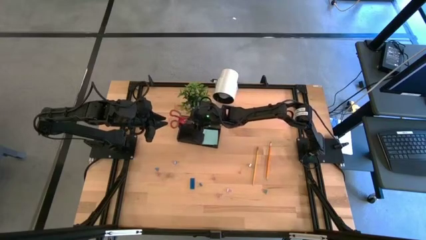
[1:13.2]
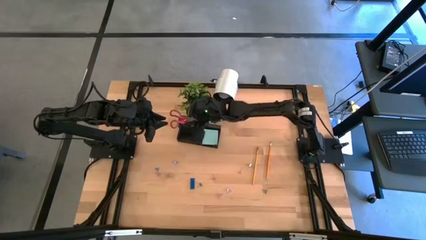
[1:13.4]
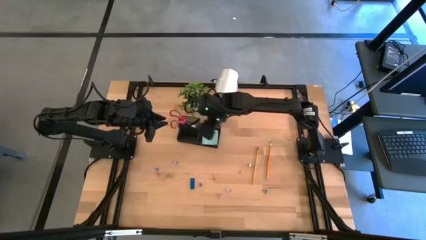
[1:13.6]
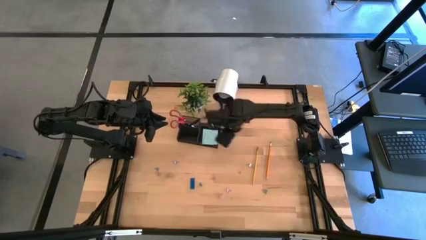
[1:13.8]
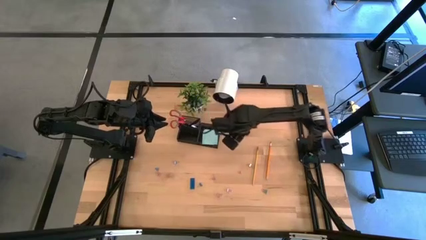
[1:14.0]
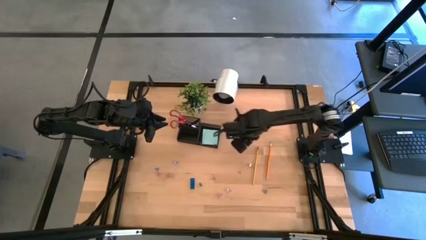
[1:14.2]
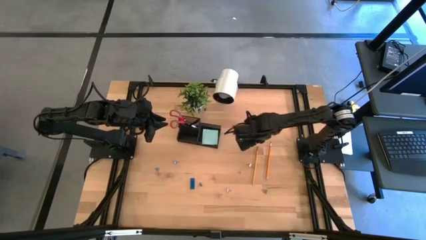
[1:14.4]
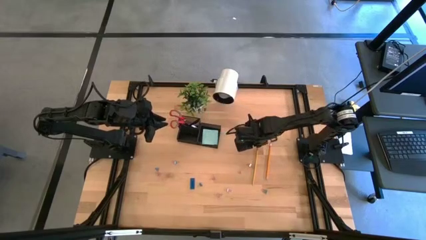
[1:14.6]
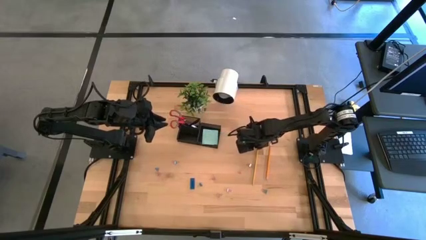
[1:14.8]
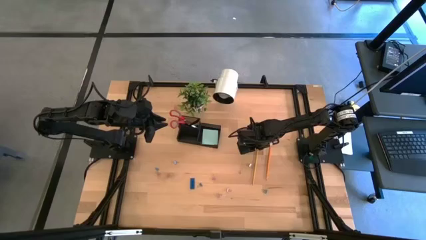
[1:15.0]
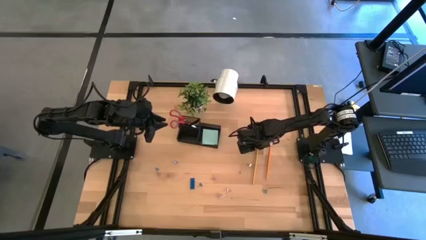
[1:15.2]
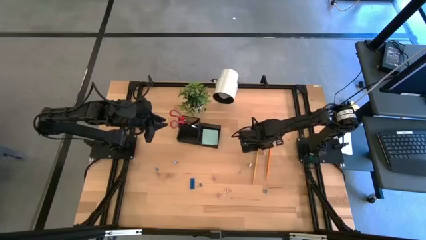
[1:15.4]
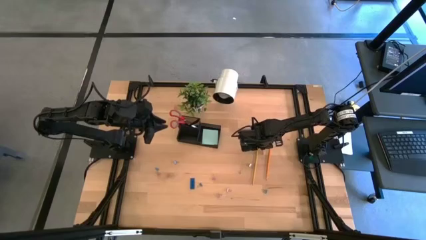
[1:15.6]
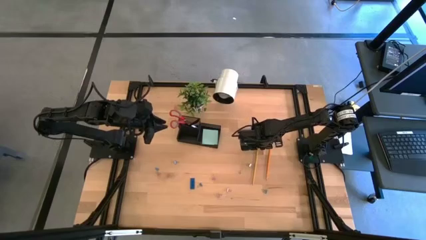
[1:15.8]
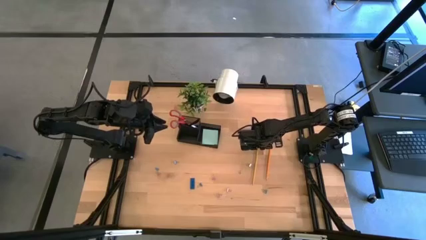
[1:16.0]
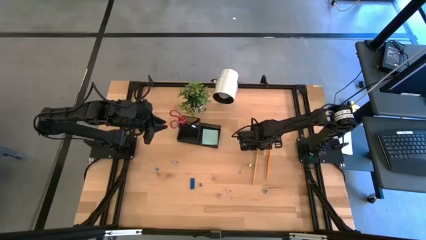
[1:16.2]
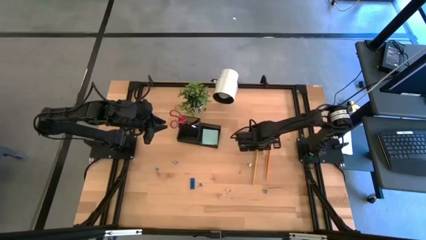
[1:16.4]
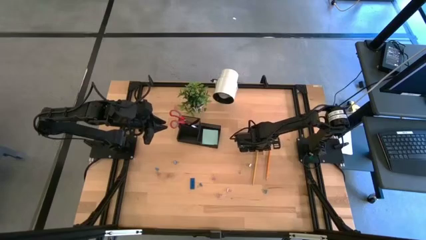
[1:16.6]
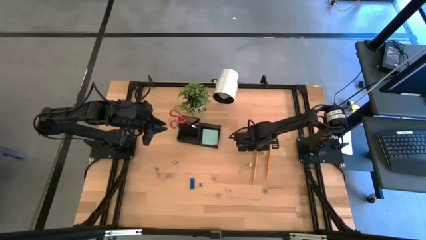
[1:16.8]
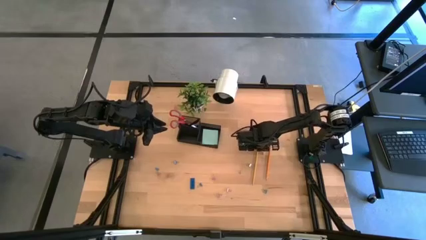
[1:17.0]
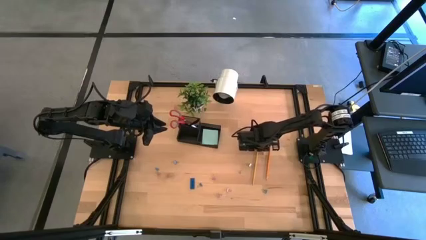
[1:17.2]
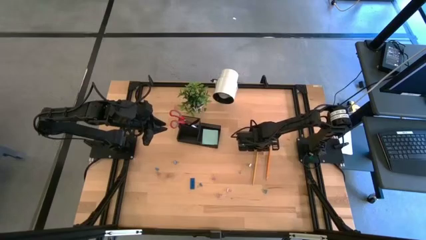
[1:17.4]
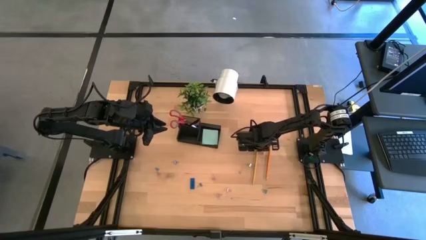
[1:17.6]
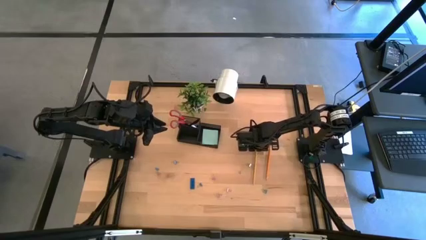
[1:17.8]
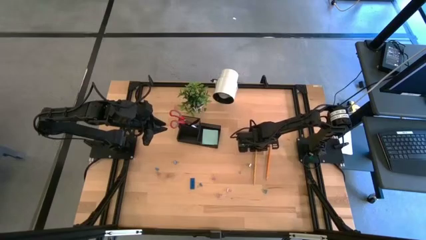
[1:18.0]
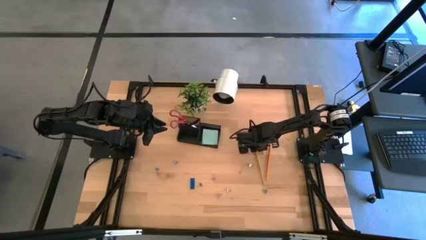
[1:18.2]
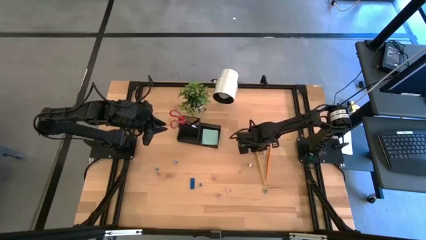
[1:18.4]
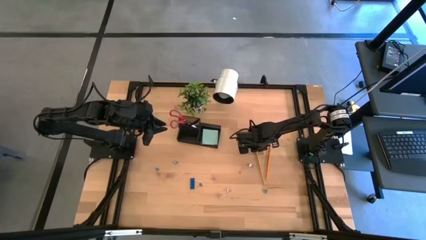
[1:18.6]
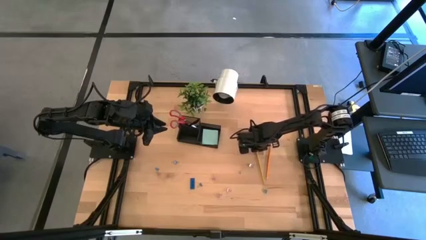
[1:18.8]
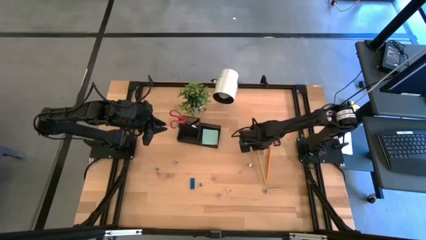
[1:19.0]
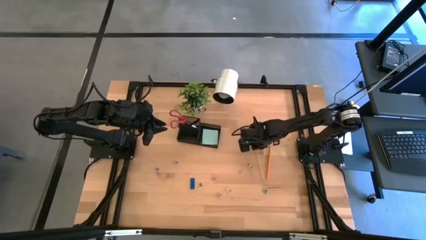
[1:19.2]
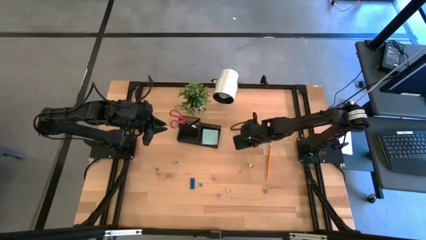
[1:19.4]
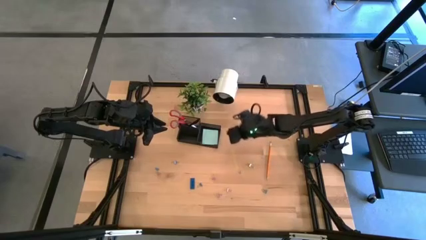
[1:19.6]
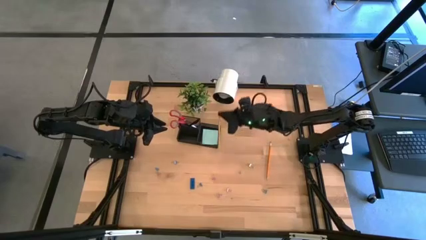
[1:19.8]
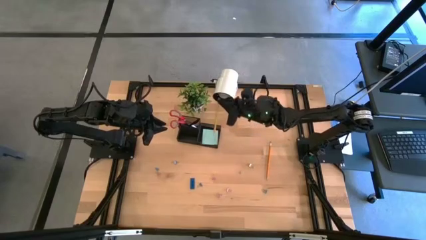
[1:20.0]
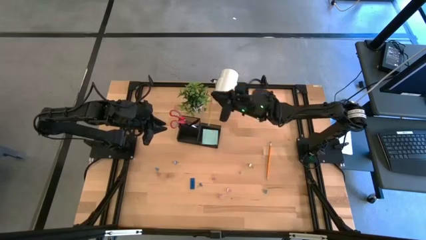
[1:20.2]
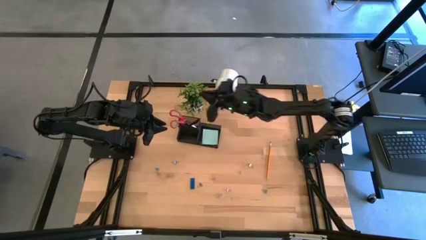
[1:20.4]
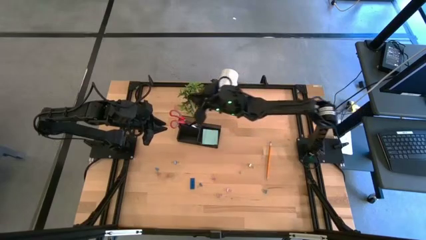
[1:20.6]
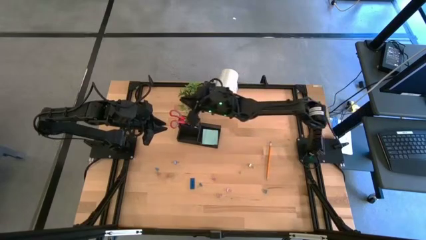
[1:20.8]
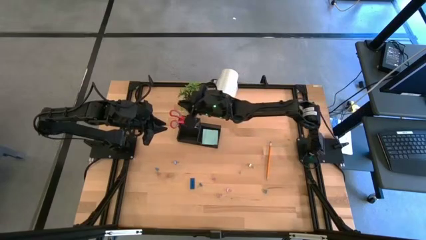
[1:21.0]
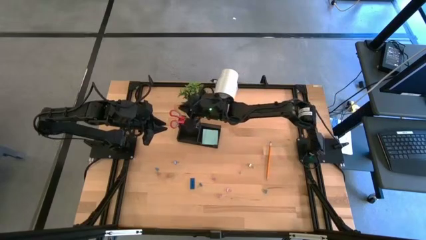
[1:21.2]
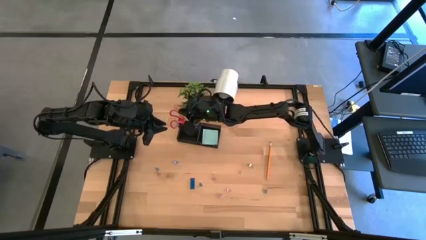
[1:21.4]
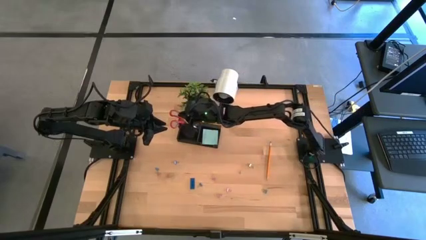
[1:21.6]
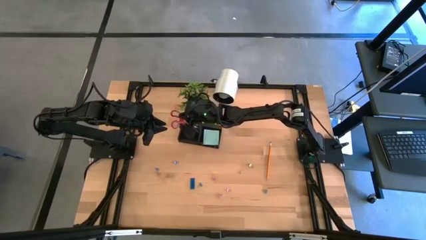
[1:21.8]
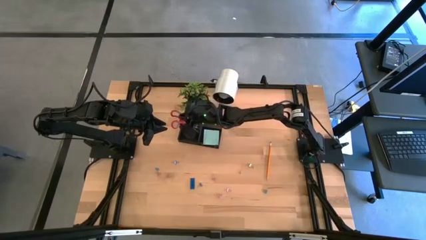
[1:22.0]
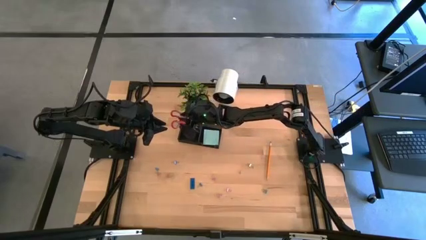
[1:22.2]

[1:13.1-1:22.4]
Task: Pick and place office supplies into organizer
Put the yellow pencil into the black desk organizer

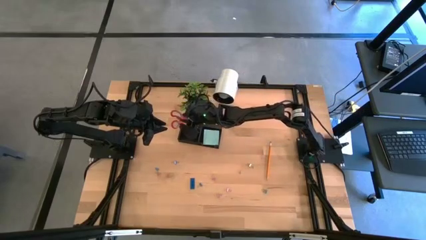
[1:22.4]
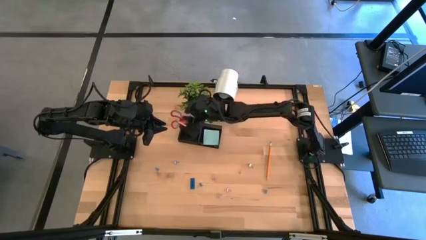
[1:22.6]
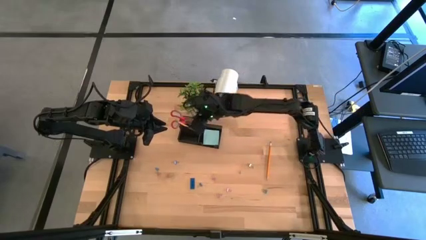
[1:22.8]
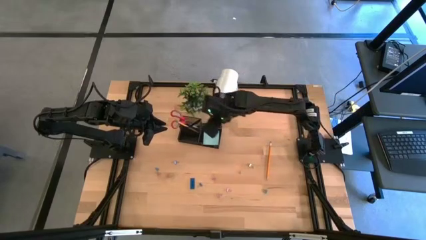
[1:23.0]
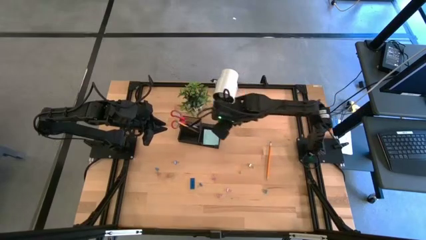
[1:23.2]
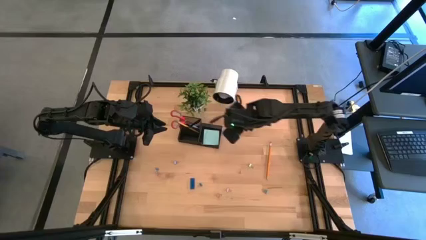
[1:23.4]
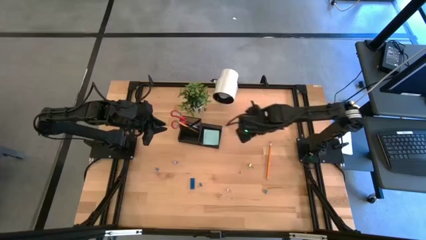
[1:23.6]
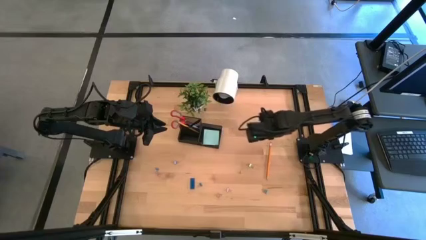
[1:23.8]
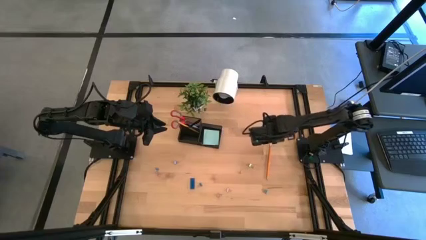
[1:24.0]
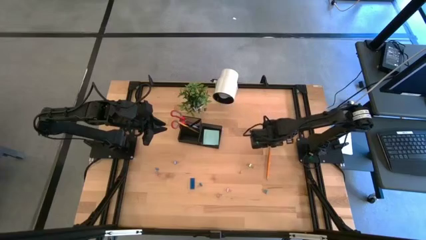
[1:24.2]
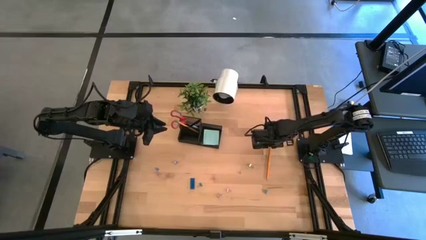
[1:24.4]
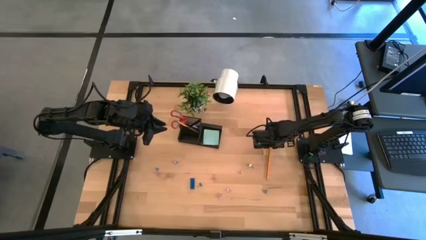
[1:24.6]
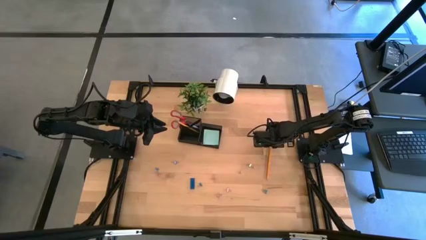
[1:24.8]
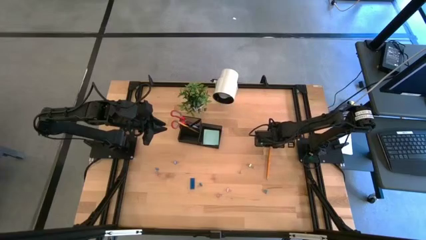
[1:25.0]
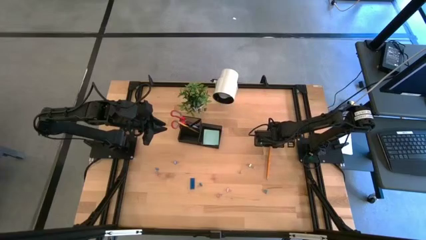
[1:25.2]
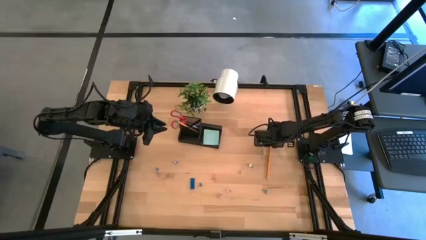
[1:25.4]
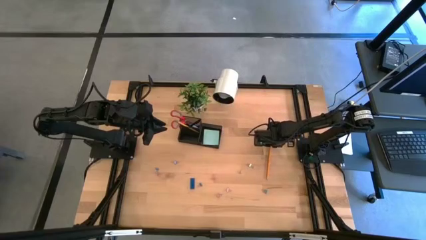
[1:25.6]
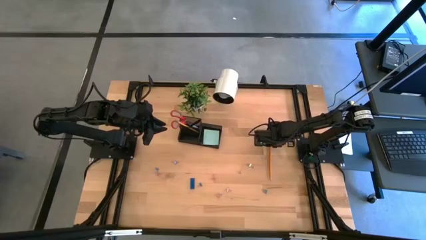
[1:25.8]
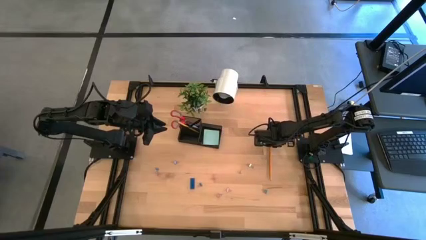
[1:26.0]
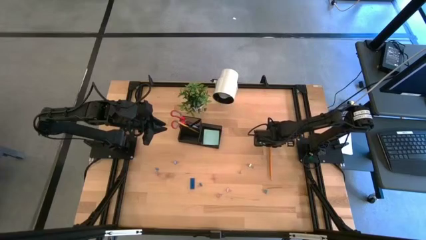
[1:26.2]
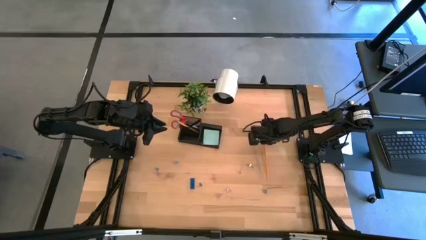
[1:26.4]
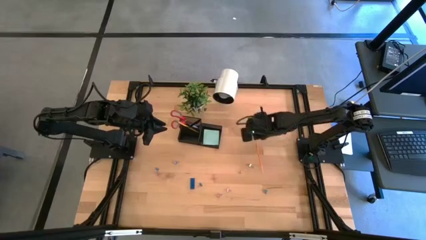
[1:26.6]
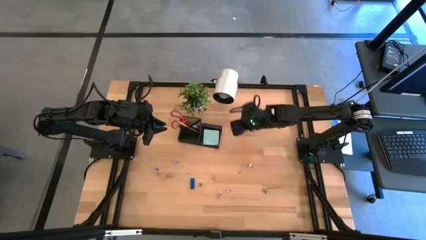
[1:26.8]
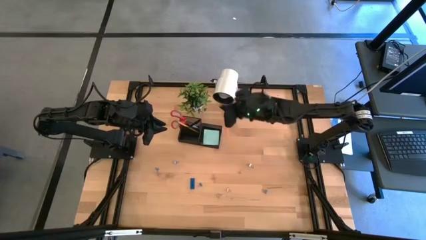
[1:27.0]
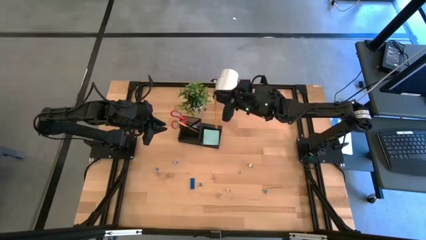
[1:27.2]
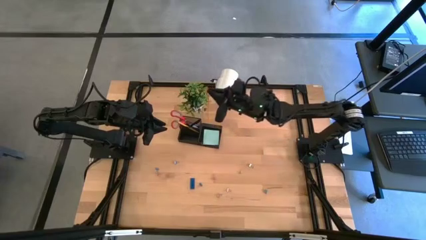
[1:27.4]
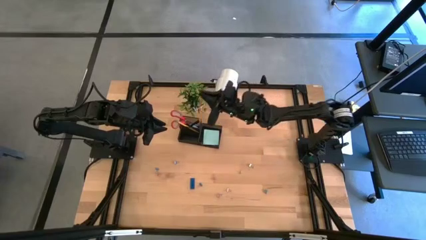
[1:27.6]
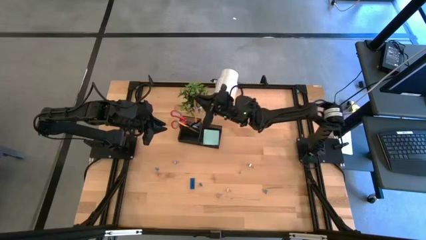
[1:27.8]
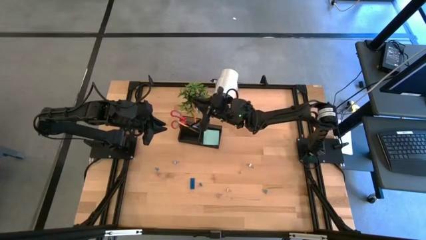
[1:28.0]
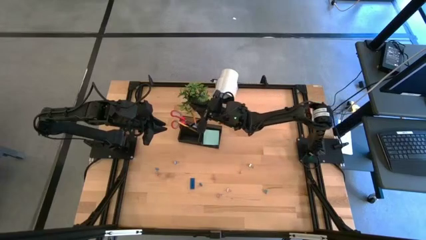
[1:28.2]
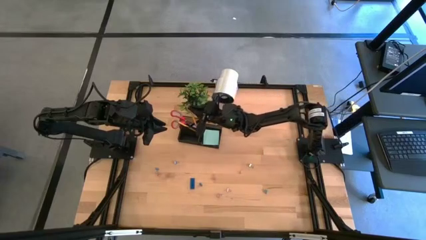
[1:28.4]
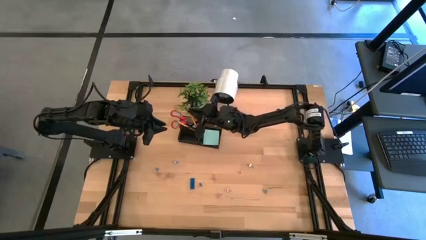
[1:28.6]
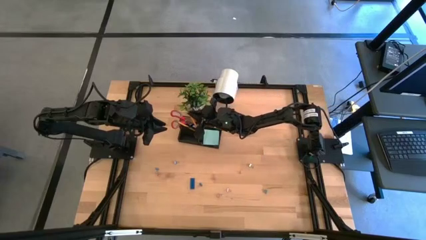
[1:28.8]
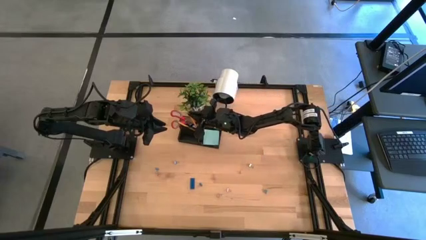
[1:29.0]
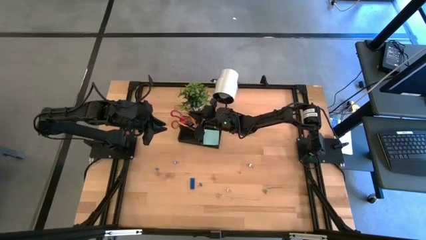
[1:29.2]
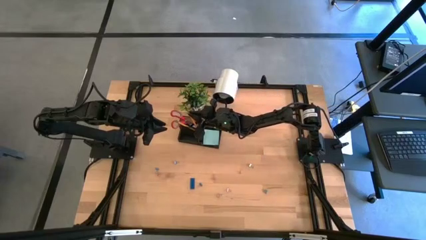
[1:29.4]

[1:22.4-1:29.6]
Put the orange pencil into the black desk organizer
